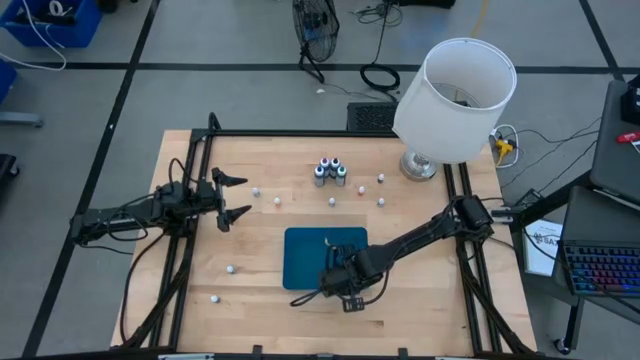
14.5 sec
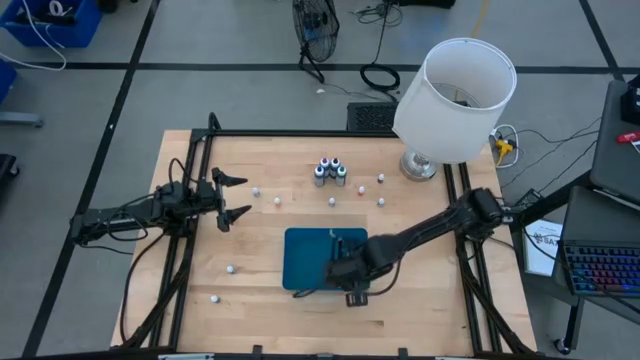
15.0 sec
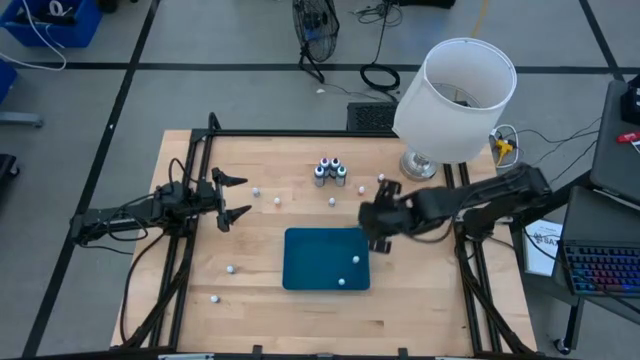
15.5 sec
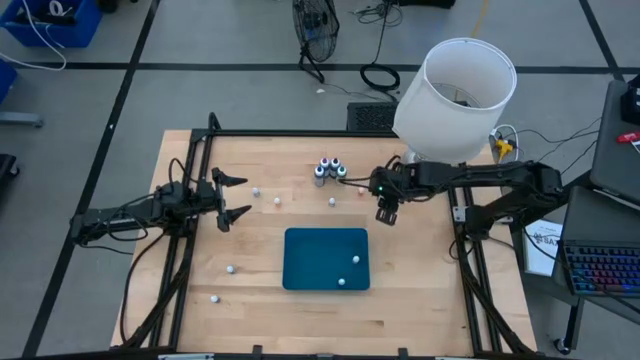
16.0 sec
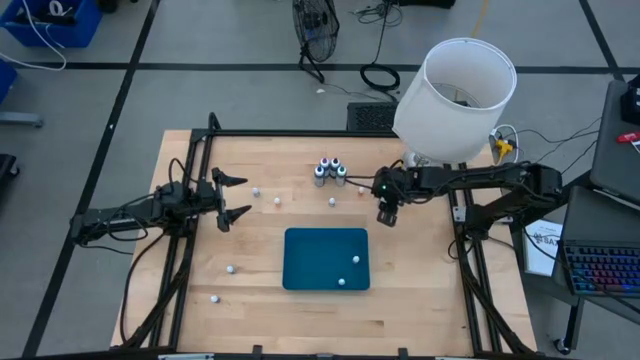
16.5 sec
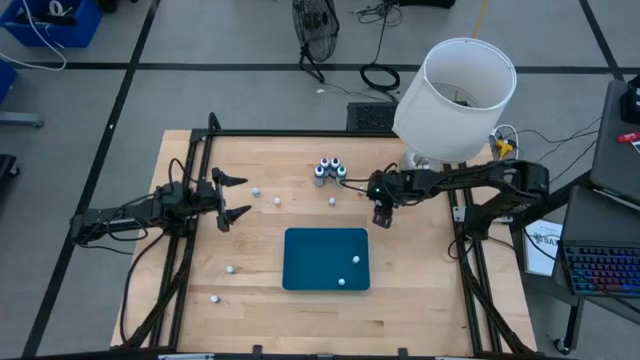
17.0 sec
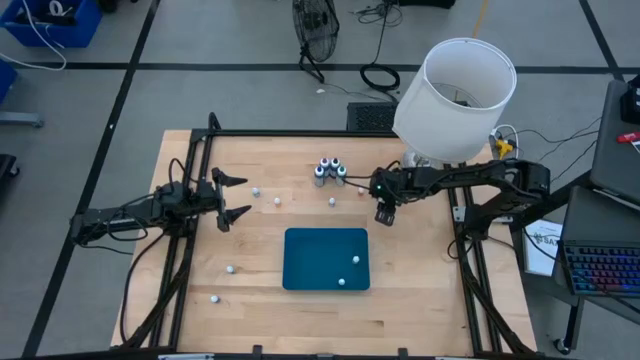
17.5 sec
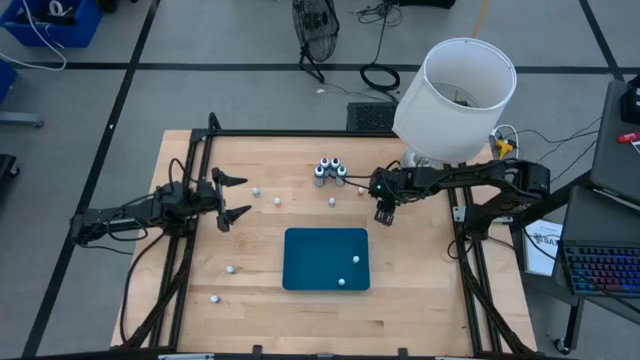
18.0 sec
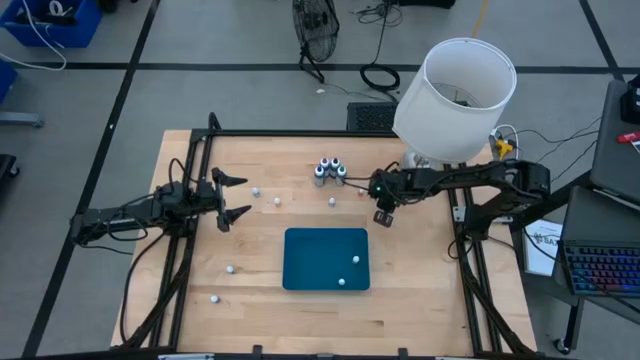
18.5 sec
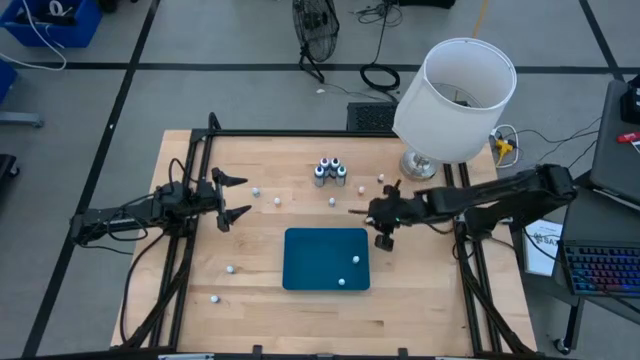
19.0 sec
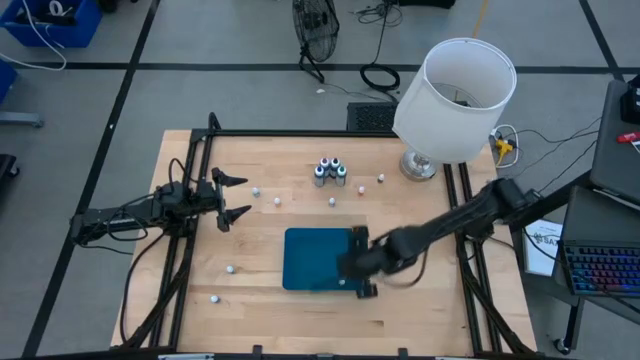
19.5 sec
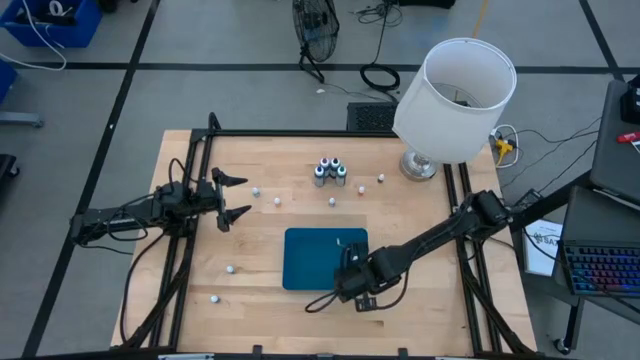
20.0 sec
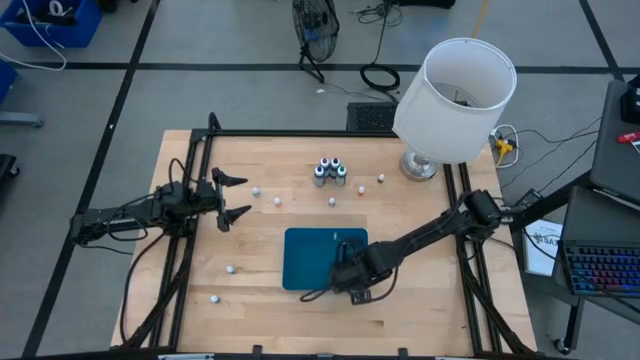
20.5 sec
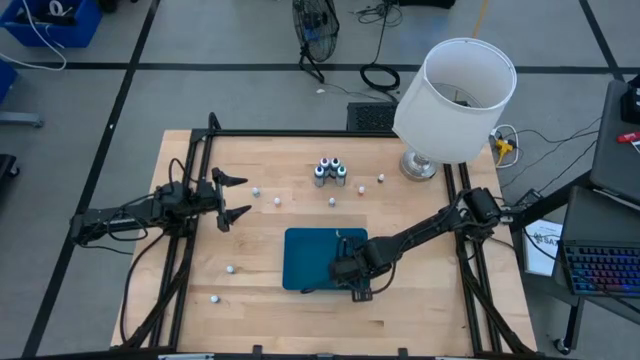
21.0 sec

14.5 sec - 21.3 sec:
Task: Pick & Place food coloring
Put the green food coloring bottle into the bin

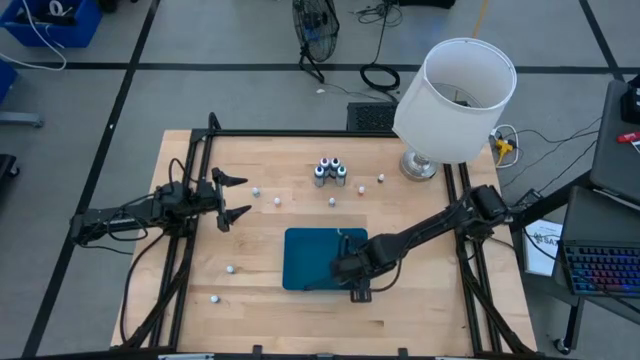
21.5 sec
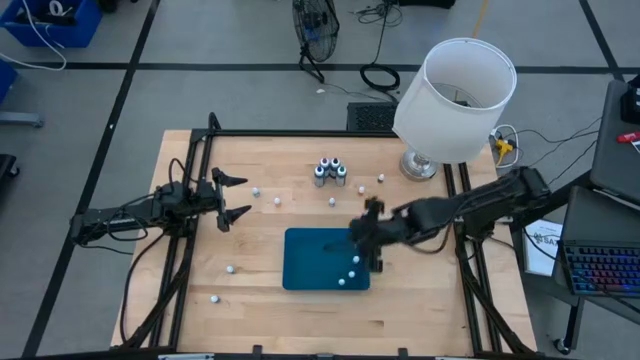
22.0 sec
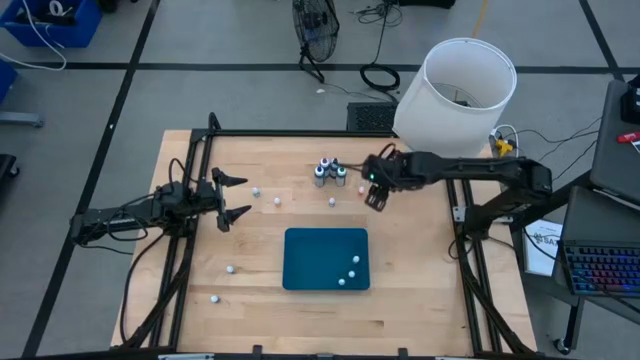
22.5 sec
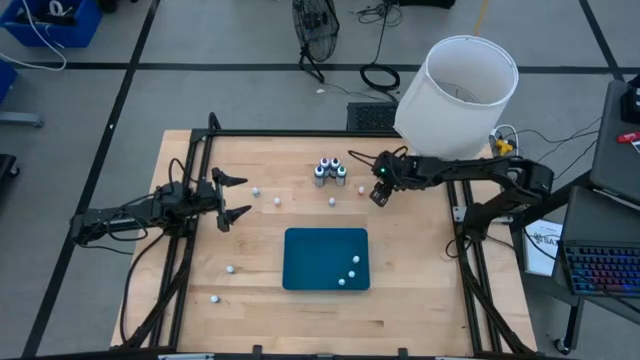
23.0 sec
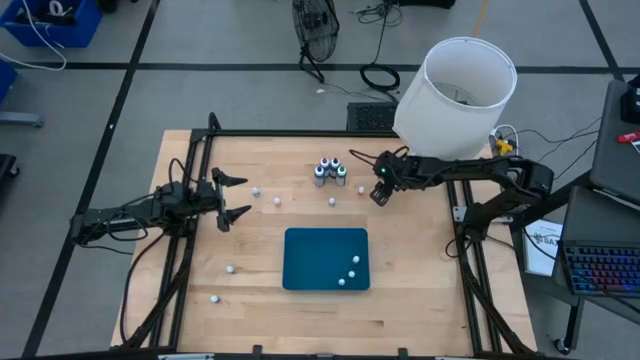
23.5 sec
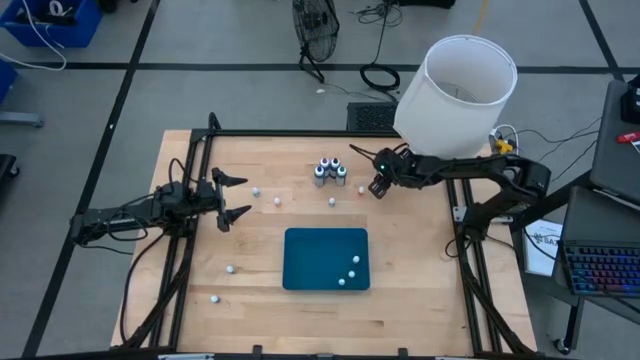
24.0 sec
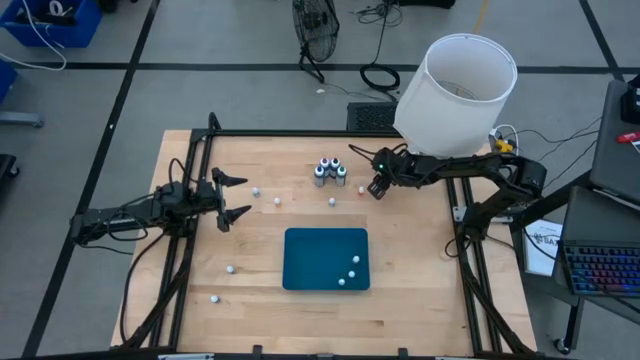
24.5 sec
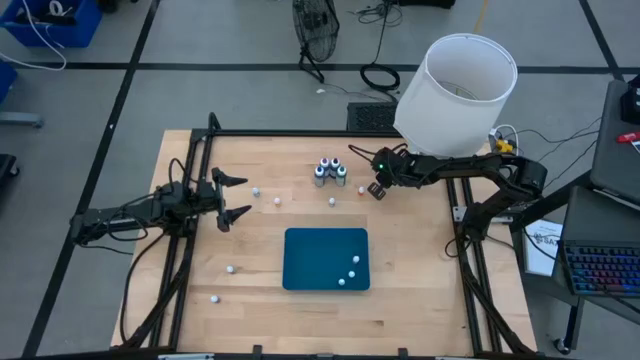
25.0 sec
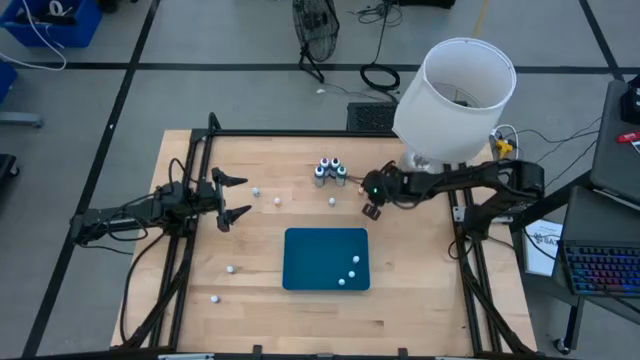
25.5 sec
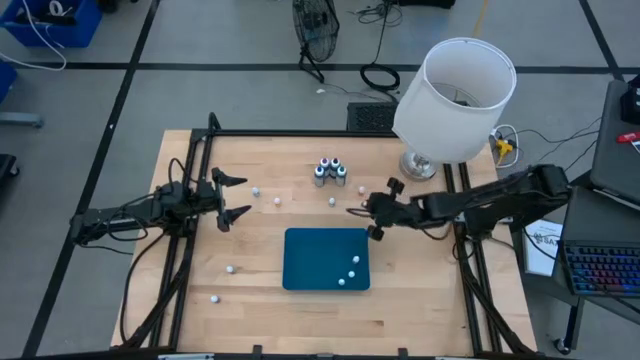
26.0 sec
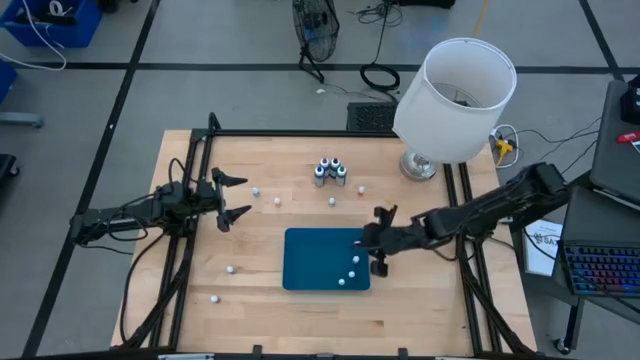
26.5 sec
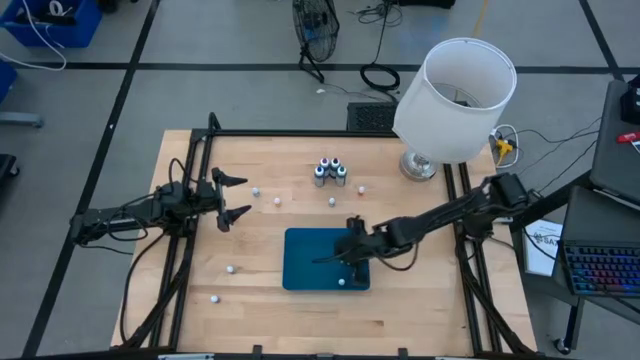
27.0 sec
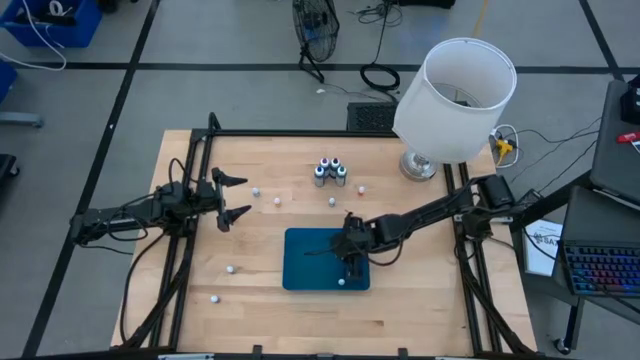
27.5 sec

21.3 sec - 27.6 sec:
Put the red food coloring bottle into the bin

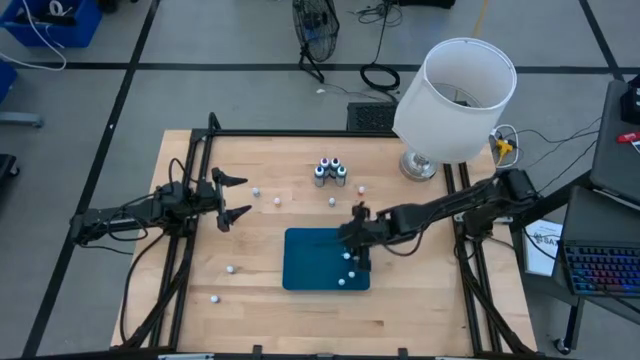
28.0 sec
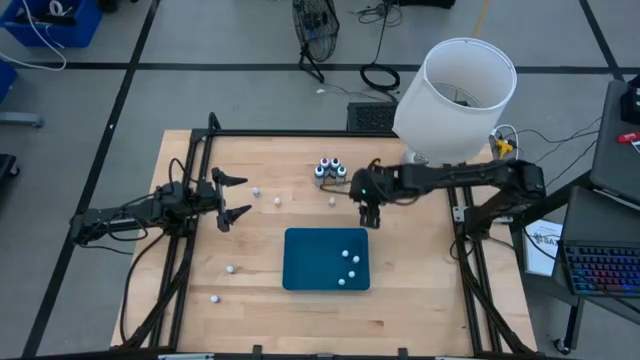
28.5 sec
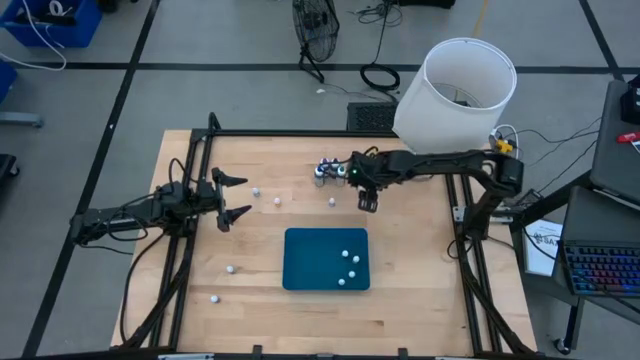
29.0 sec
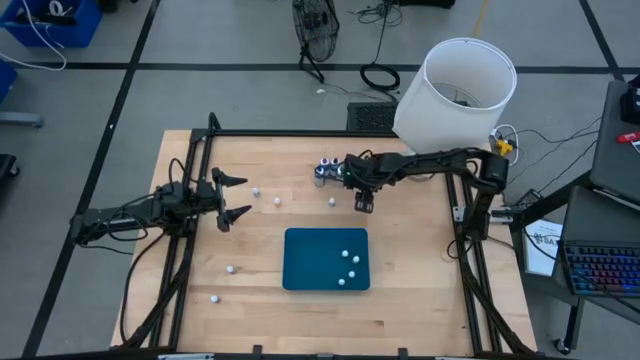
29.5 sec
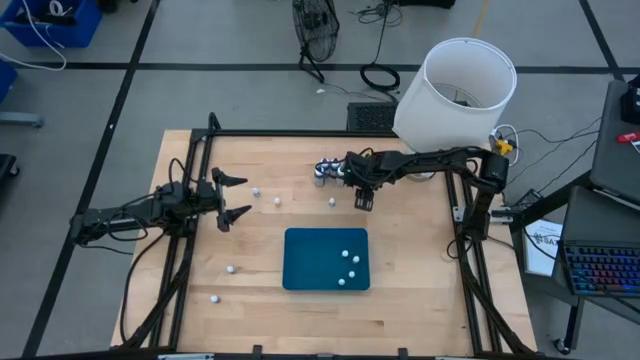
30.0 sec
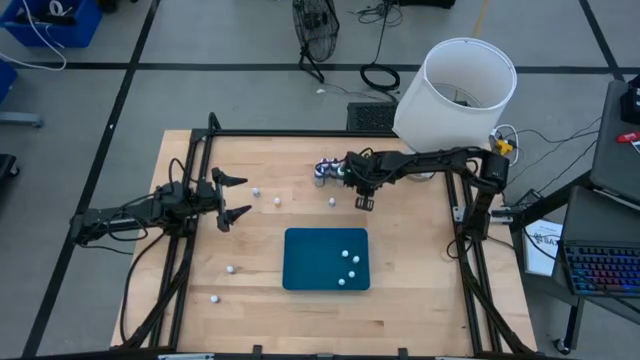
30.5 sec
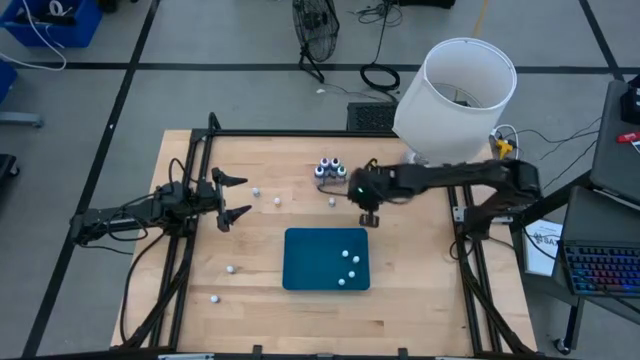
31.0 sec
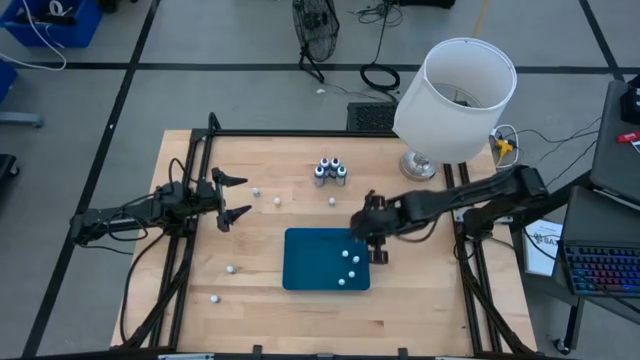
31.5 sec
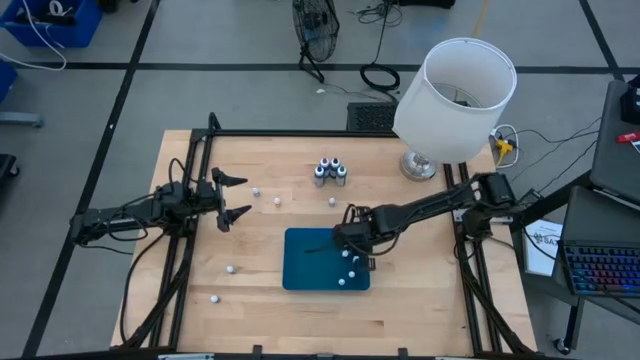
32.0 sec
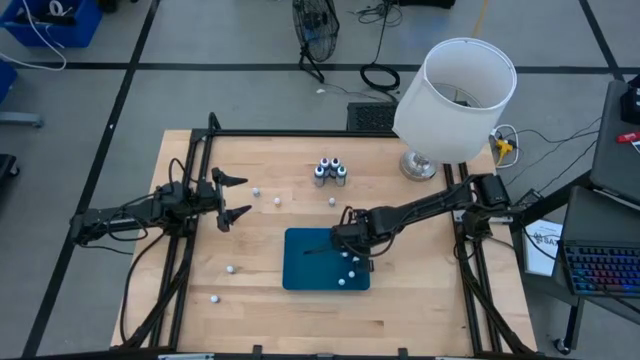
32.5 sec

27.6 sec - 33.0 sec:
Put the yellow food coloring bottle into the bin

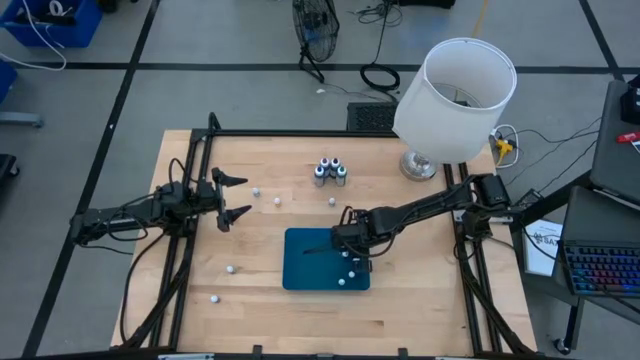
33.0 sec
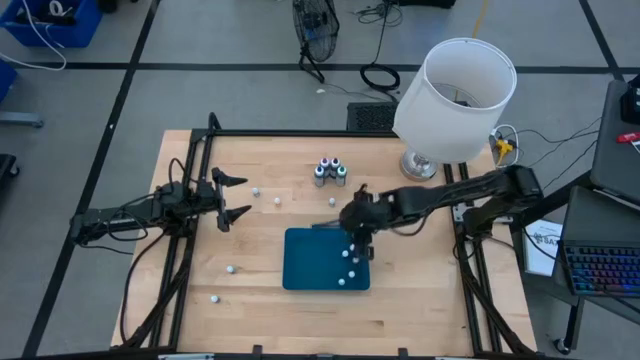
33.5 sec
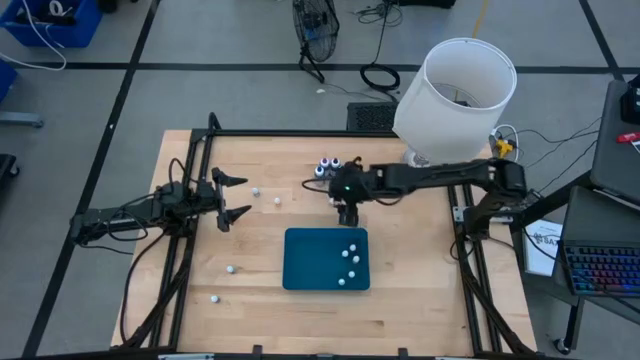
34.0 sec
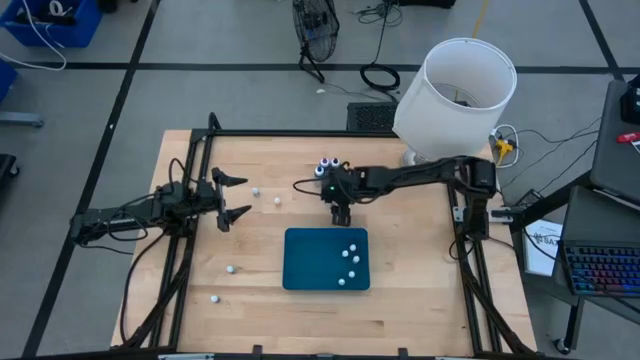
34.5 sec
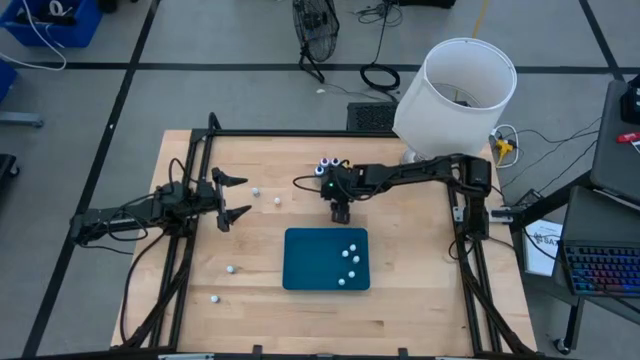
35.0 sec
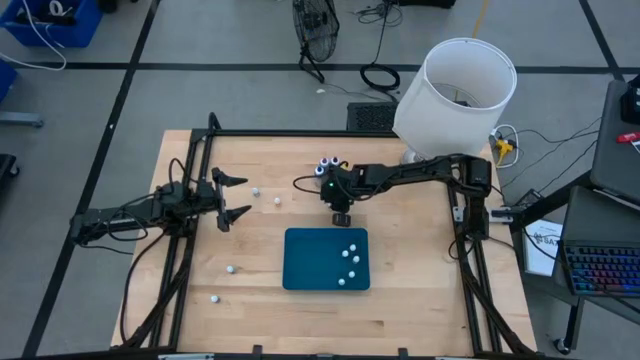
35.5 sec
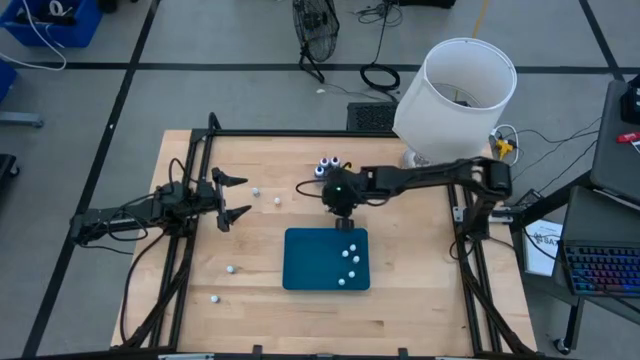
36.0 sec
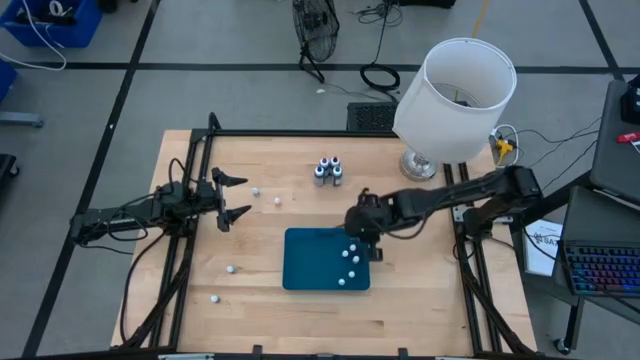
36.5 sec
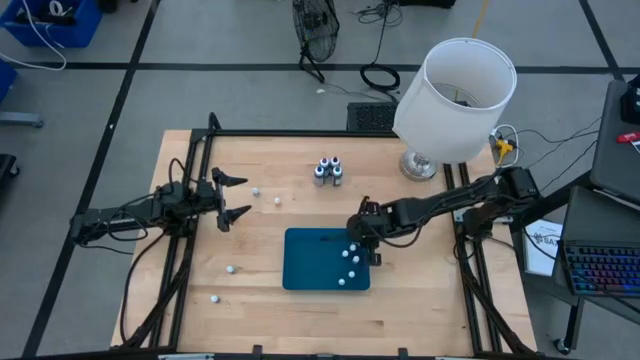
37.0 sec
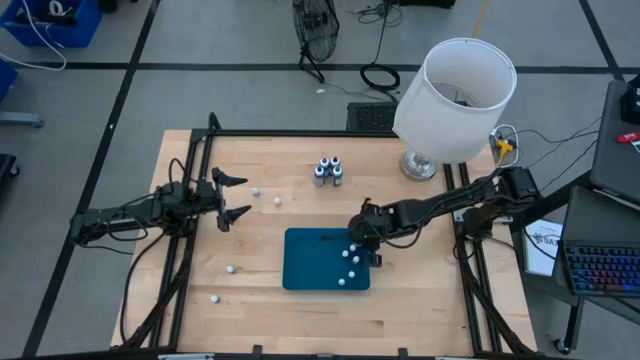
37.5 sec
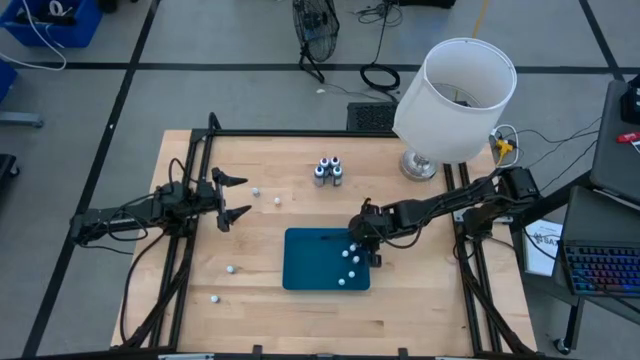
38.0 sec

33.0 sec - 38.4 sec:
Put the orange food coloring bottle into the bin
